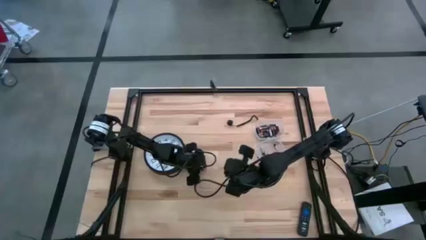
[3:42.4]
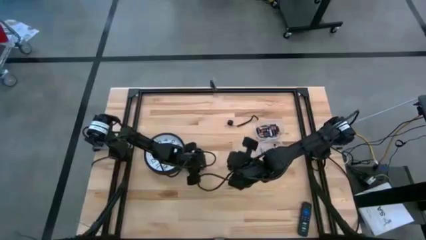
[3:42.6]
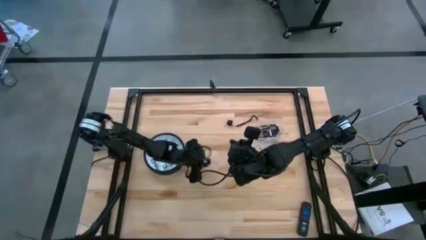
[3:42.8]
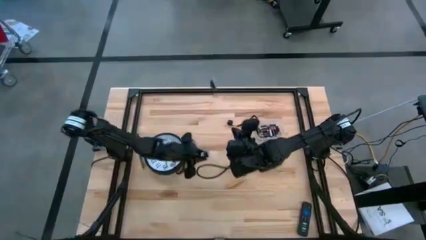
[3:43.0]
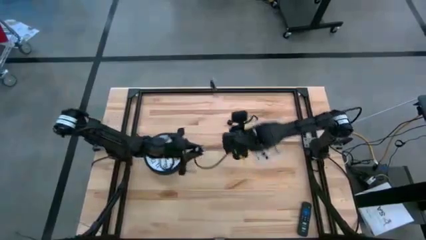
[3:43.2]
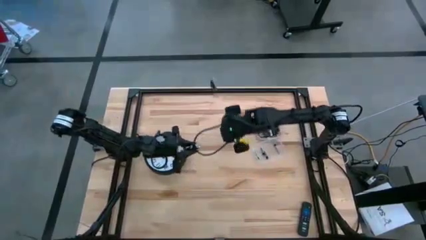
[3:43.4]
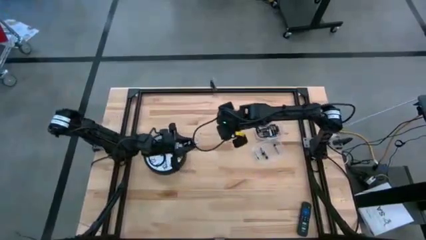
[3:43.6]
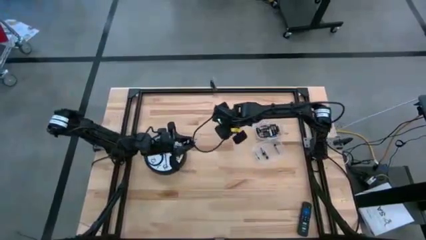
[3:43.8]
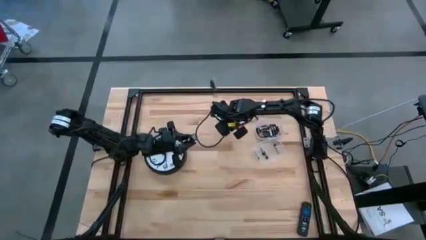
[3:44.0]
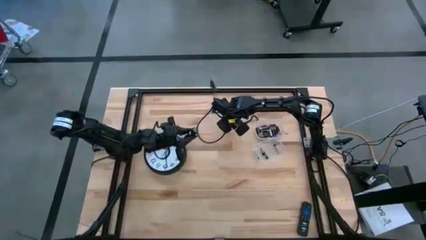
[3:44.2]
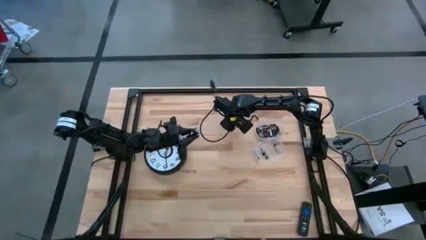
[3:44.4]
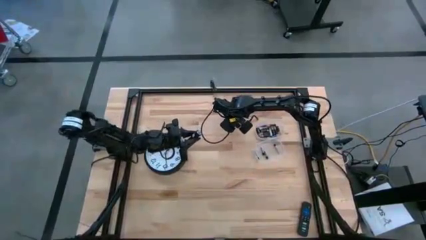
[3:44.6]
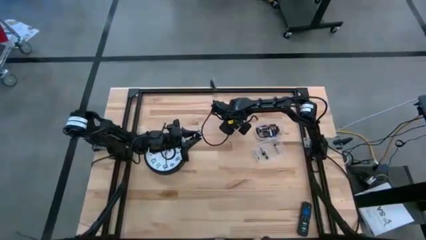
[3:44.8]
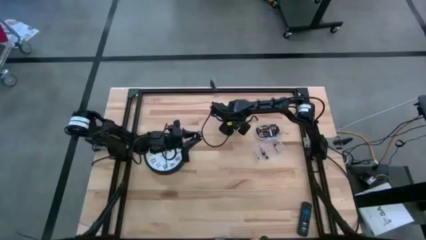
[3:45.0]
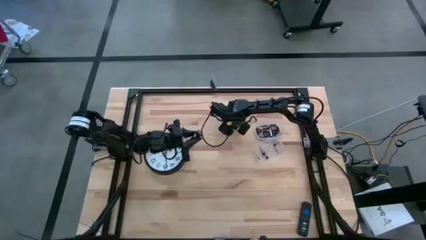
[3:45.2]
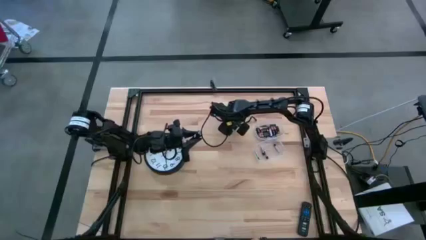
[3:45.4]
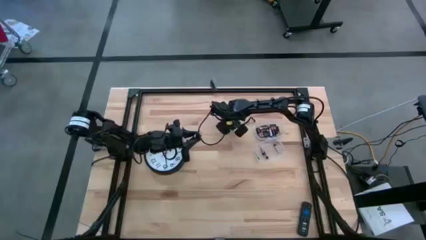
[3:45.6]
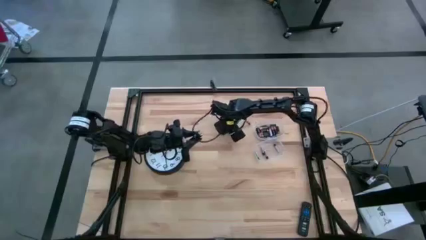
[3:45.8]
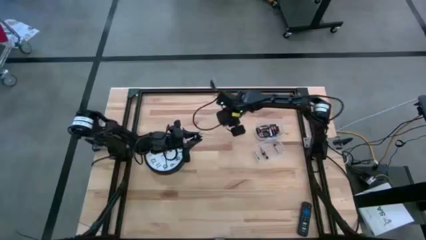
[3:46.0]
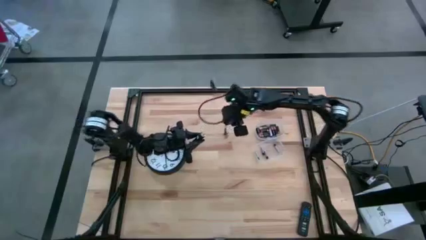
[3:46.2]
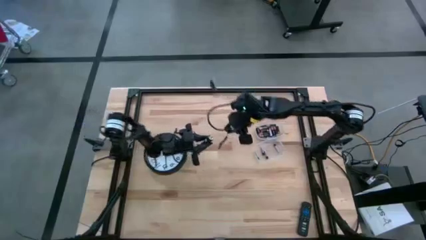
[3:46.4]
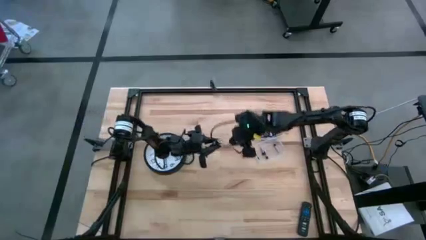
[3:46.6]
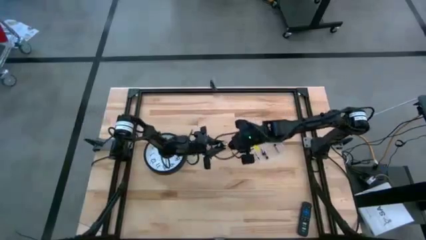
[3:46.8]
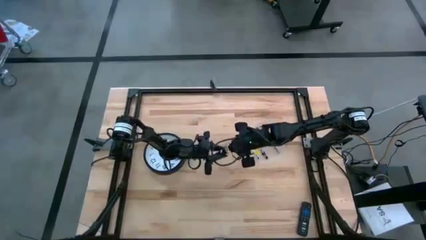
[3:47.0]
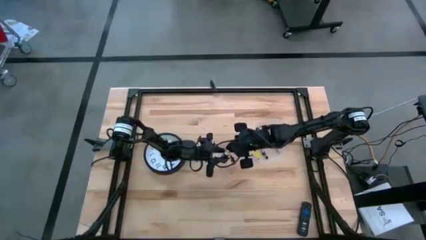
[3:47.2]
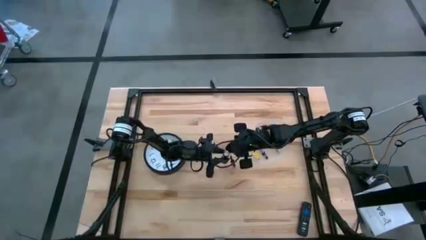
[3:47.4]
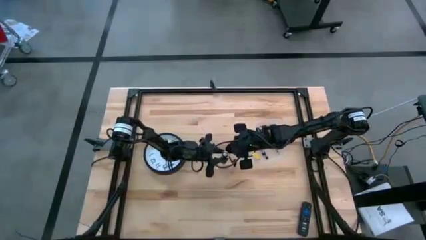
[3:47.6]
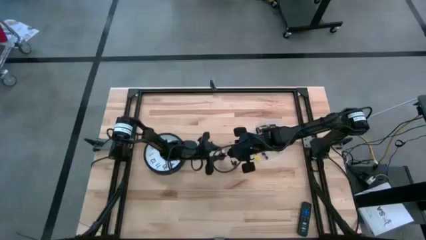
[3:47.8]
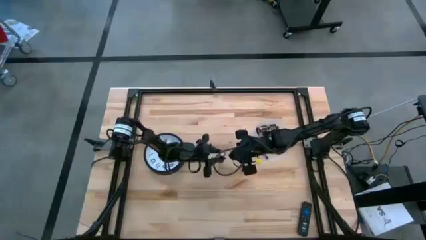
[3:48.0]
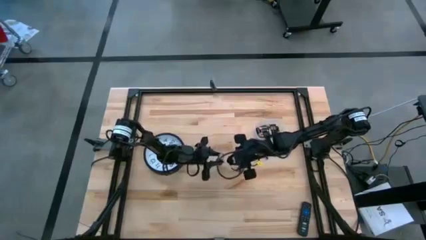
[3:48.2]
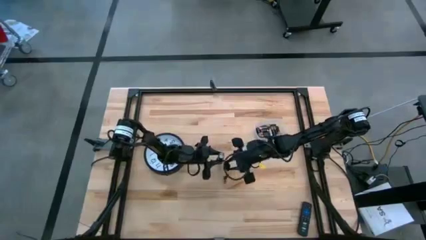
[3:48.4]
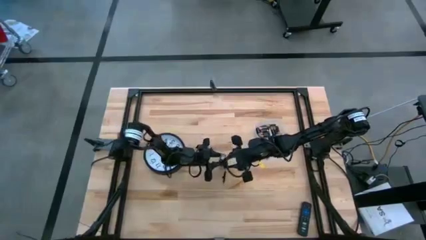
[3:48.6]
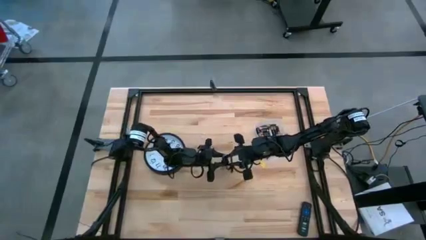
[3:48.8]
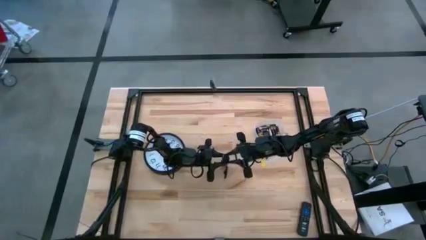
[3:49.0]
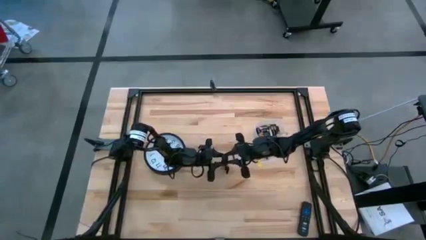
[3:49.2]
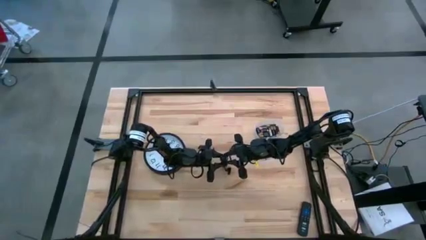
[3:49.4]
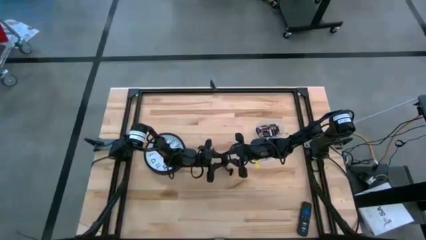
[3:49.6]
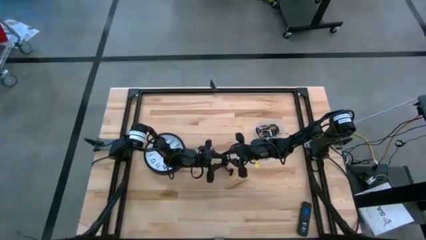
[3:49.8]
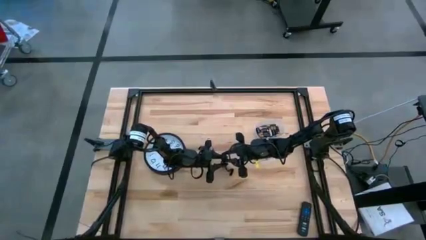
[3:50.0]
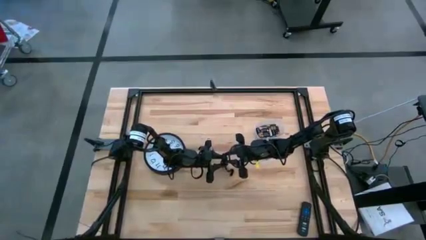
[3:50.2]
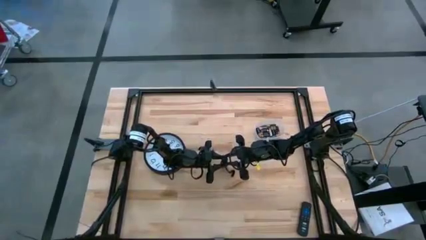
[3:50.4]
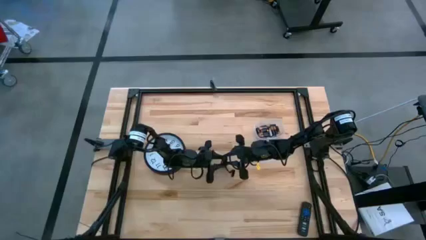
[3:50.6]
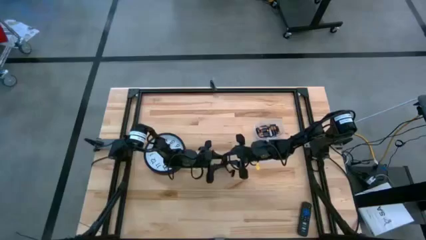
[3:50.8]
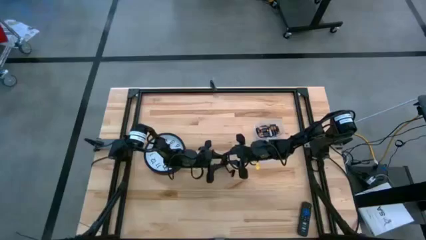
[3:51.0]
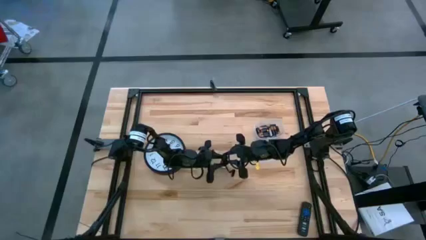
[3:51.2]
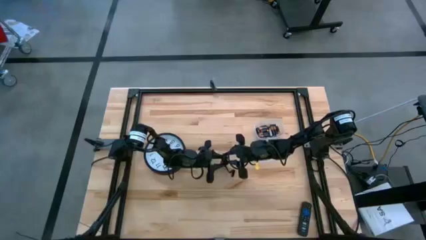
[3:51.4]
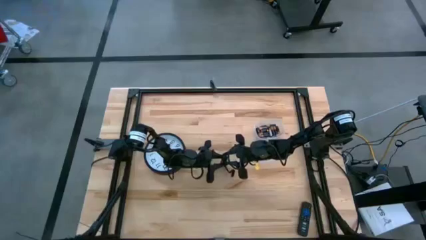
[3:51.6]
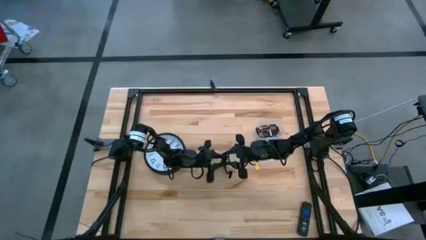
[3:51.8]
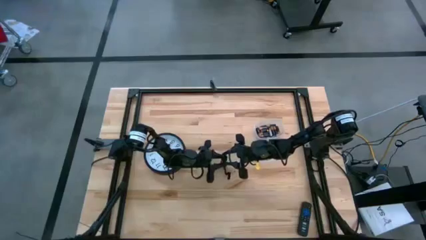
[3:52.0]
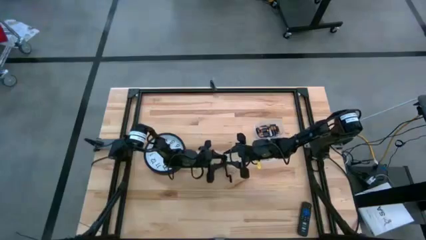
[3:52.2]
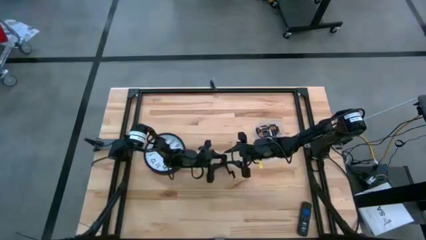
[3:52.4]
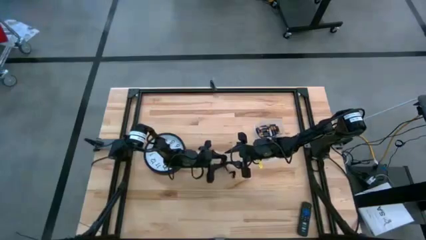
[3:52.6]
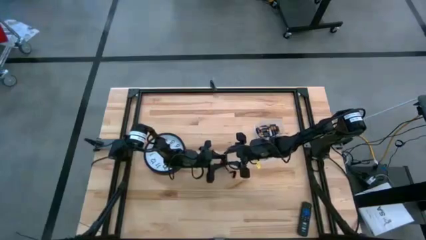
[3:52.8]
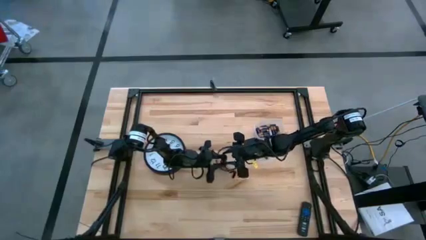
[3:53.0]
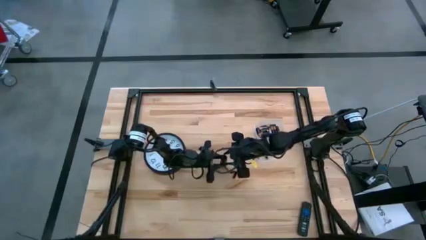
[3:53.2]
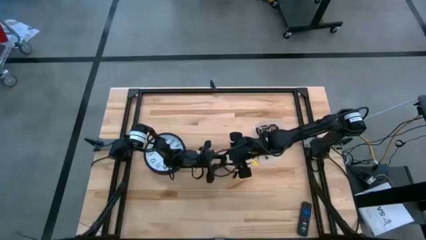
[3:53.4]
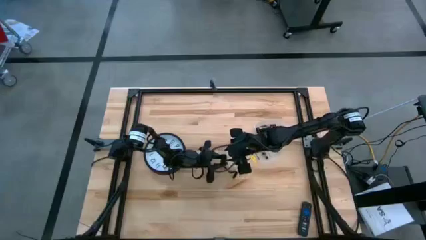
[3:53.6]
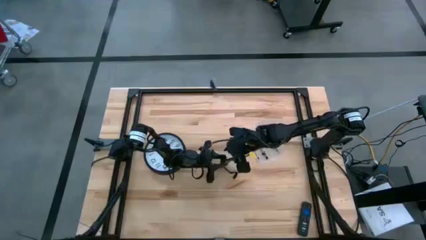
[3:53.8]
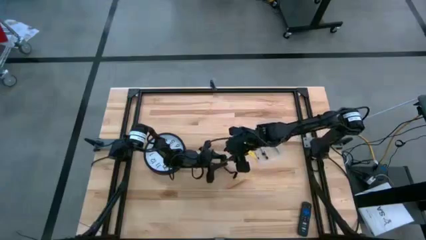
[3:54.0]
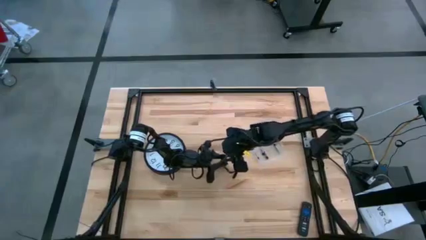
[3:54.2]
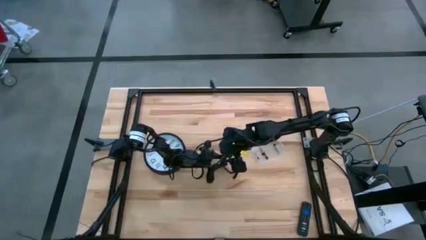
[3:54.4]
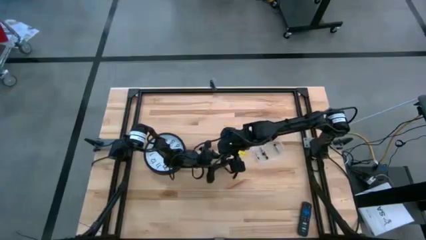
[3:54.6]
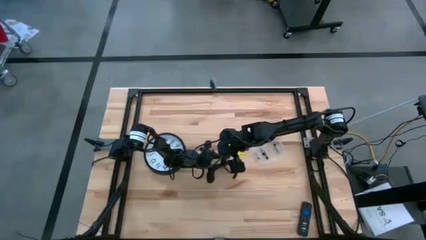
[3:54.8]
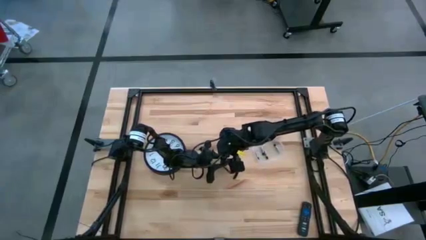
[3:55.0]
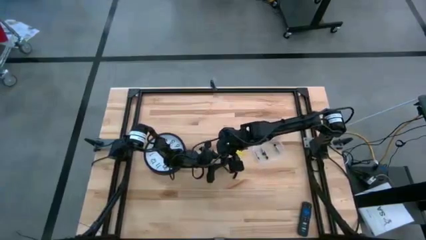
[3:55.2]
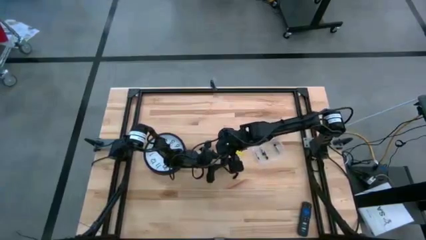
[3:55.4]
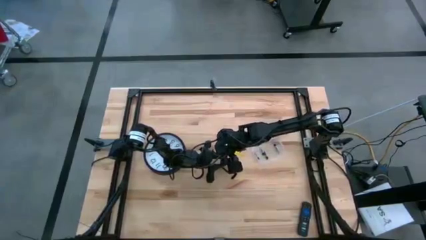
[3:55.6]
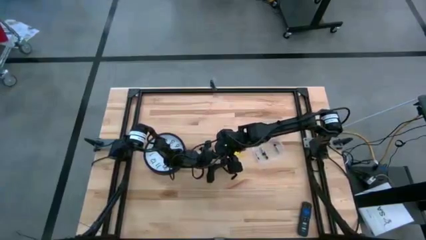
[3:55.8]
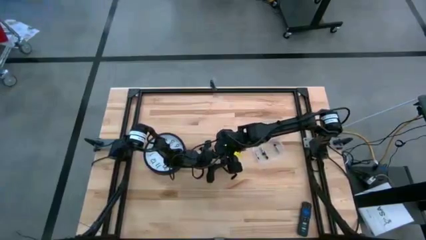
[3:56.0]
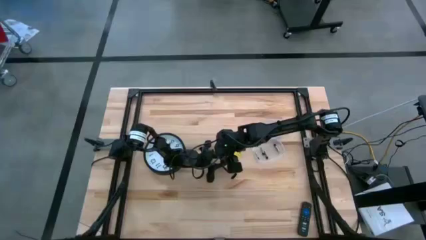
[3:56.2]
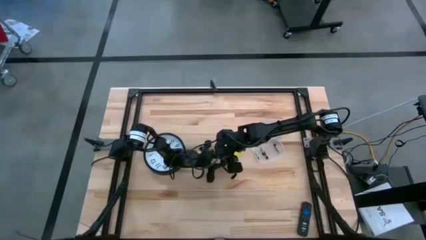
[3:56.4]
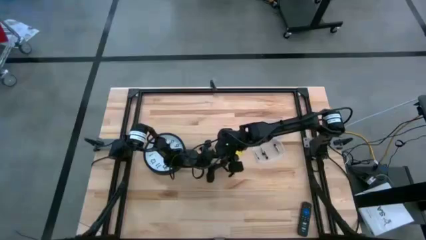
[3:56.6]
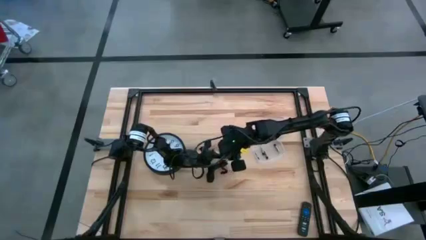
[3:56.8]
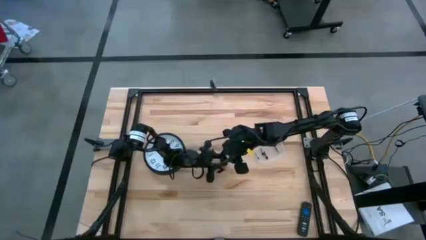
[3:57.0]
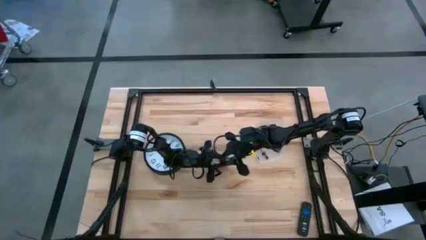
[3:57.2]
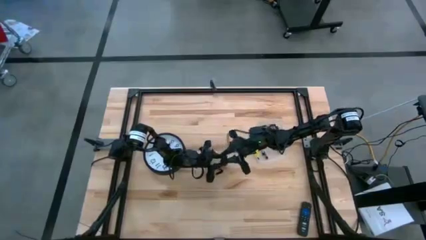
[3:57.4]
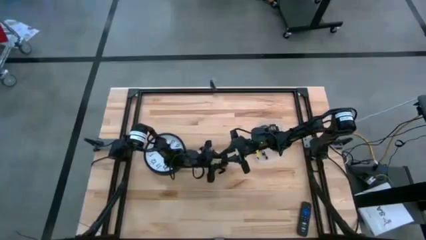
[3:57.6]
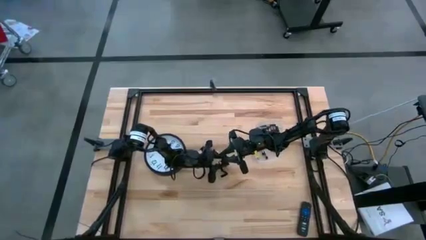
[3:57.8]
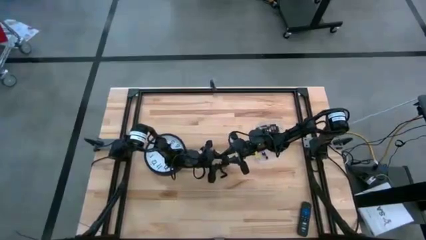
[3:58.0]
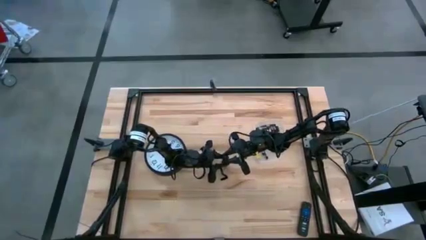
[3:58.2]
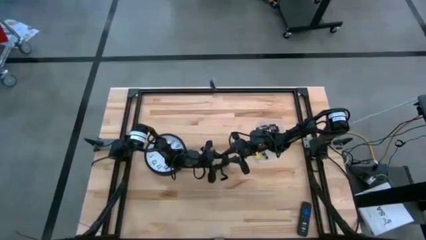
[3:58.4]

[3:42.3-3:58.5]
Task: Insert battery
Close the black battery compartment
